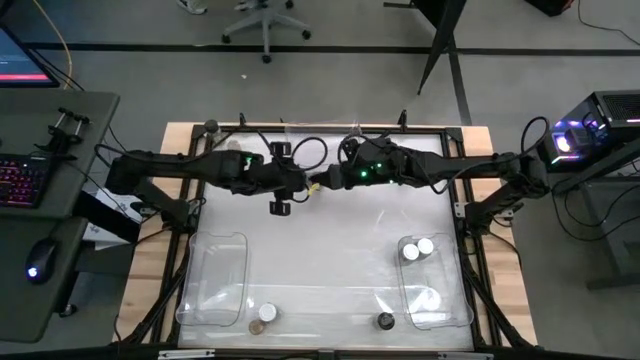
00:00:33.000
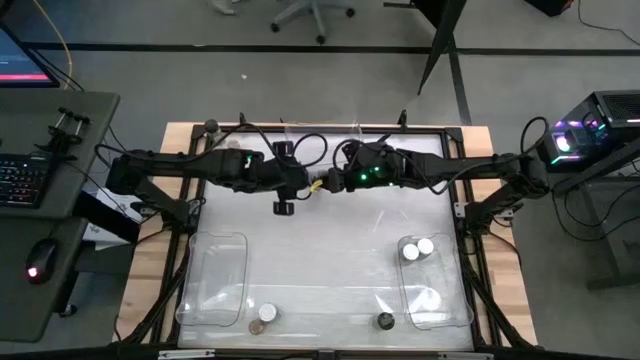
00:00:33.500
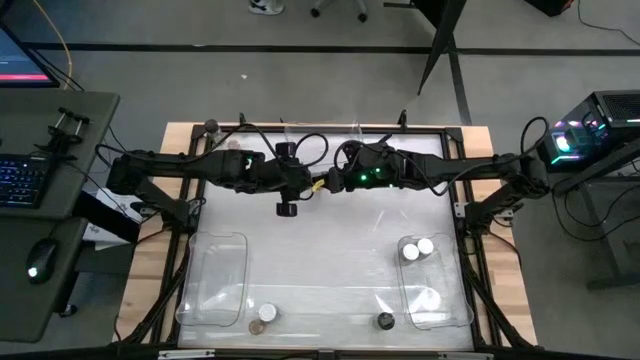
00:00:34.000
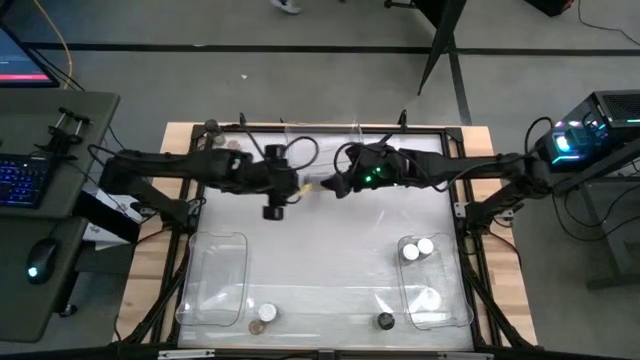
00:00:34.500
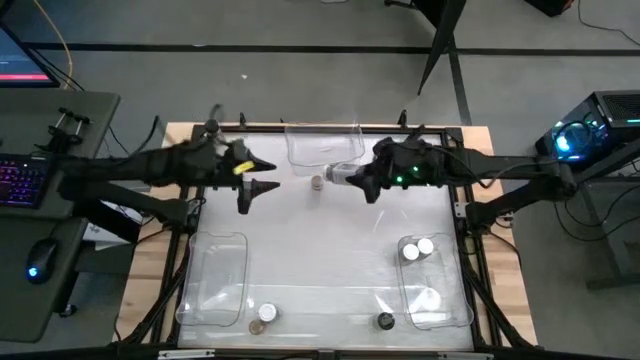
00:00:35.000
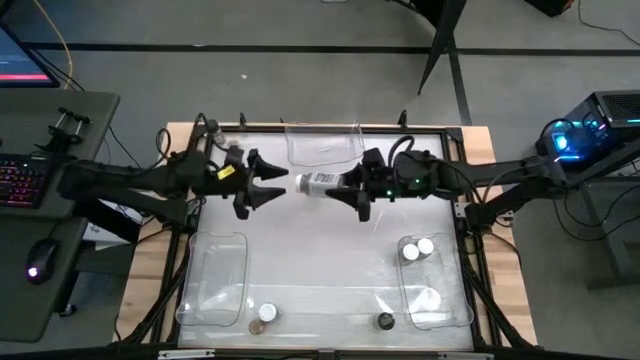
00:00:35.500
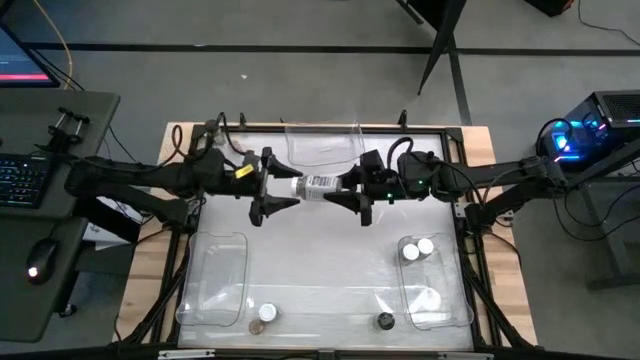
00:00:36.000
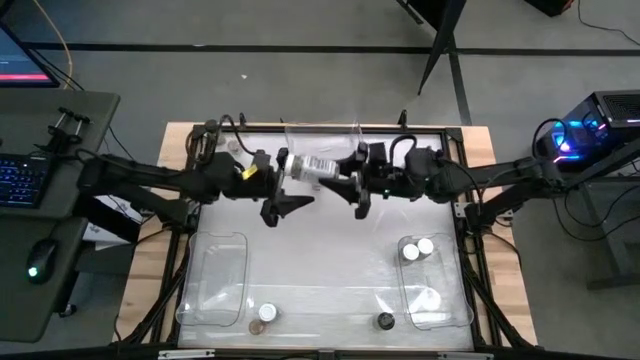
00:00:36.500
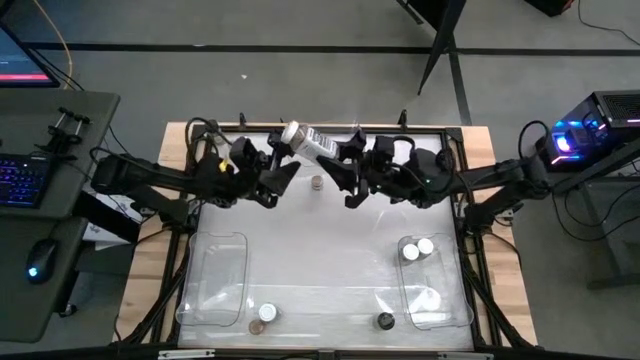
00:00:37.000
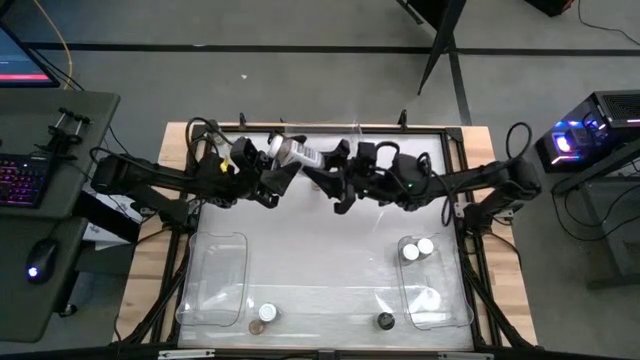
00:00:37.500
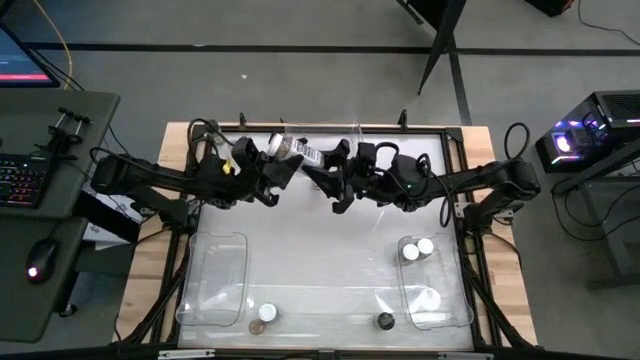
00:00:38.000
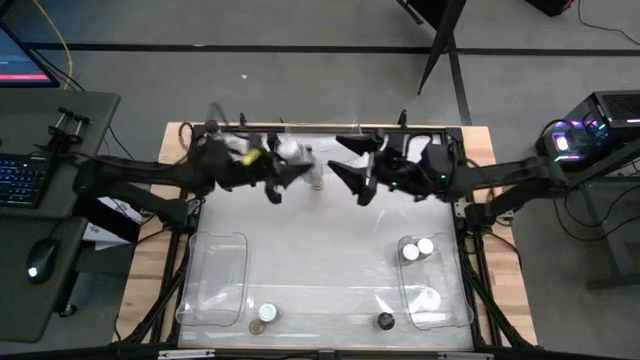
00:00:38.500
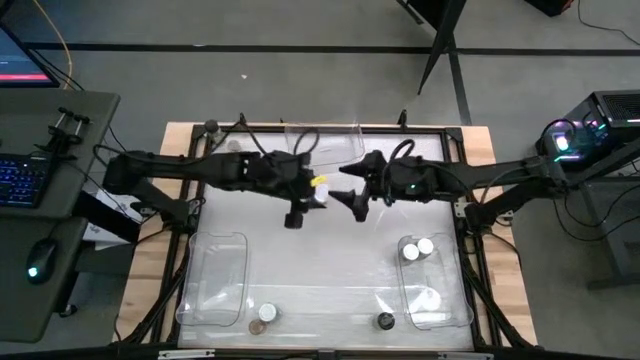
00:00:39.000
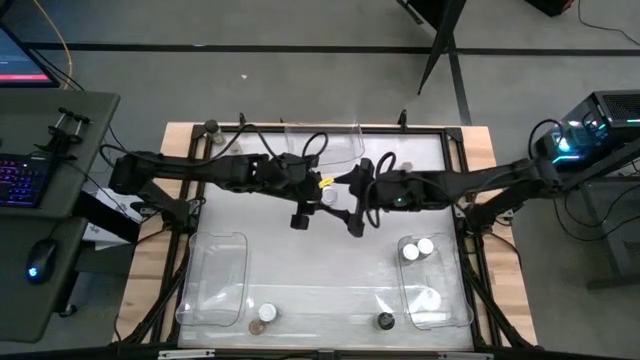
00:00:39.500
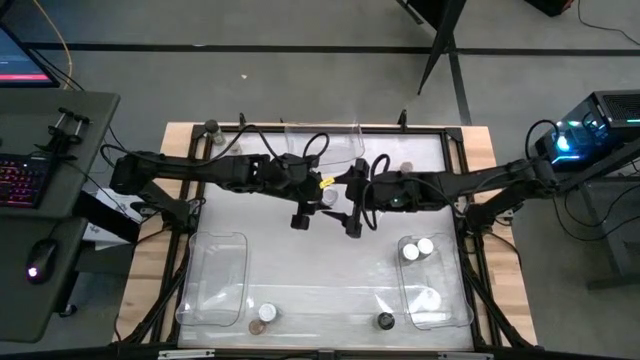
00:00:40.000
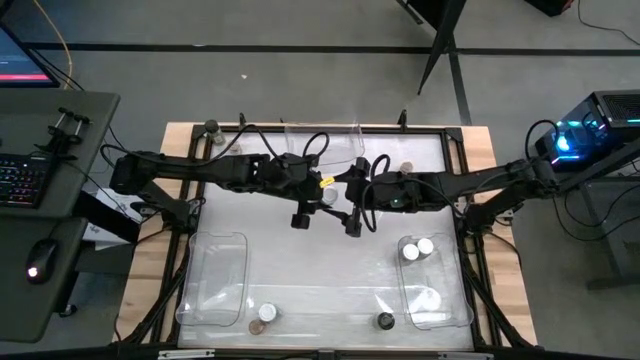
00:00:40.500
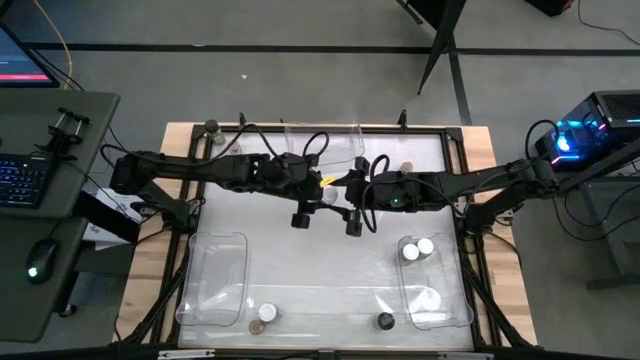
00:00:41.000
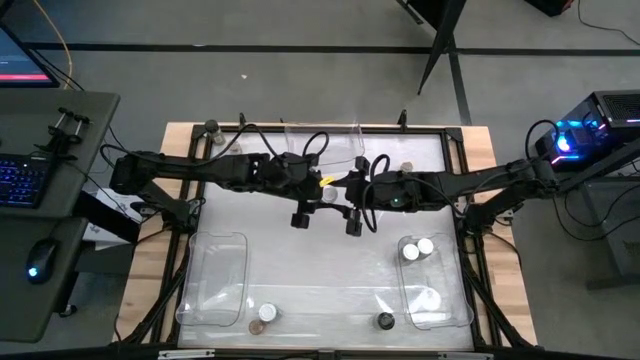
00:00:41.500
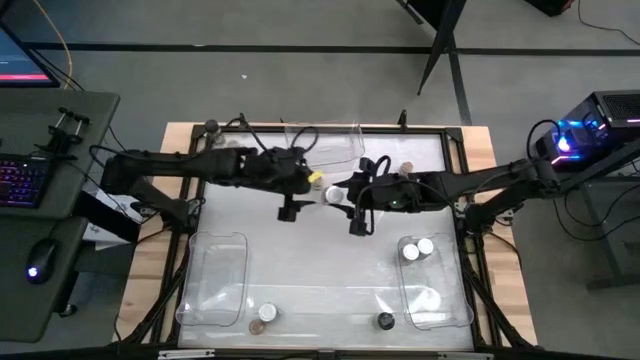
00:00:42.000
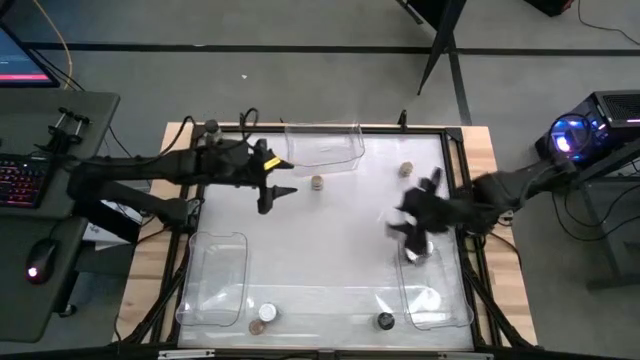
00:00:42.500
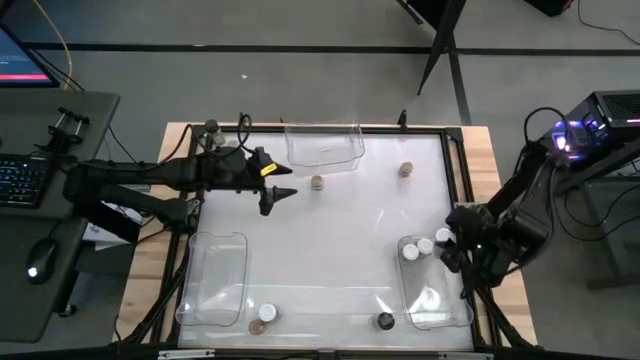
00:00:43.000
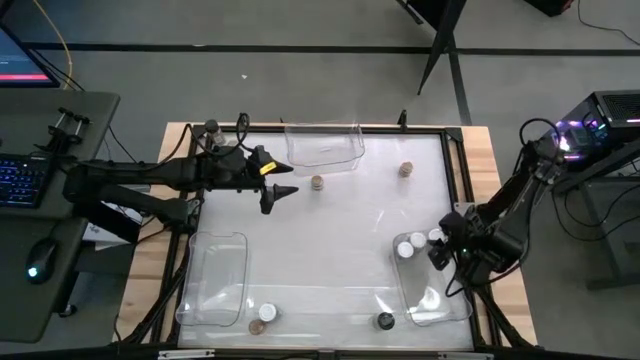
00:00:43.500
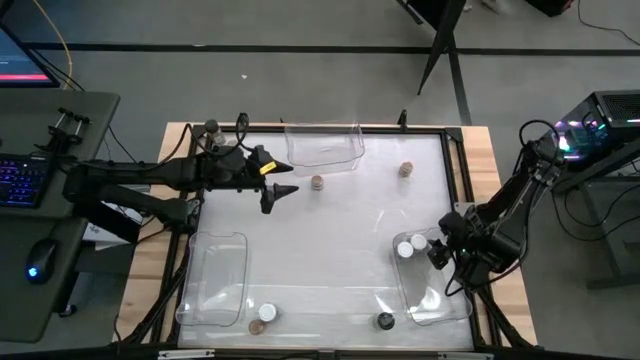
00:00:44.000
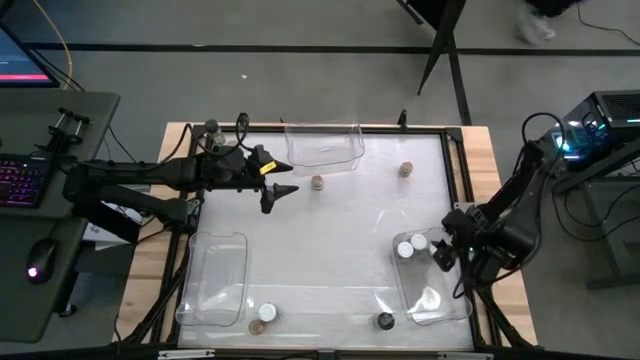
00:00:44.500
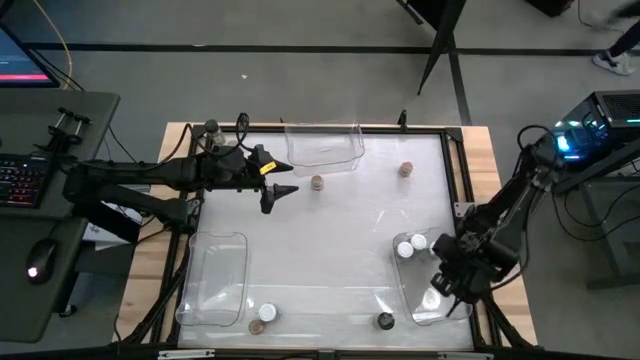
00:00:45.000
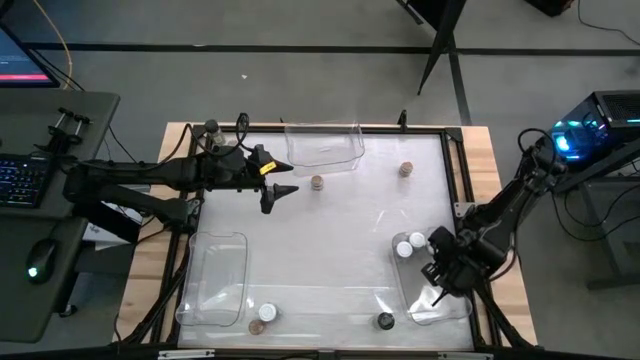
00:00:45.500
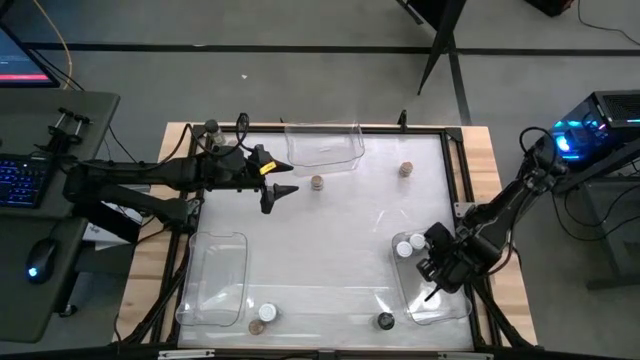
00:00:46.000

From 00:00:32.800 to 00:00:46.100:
Task: Sort spices by type
Put the white seasoning bottle into the bottom right transparent bin

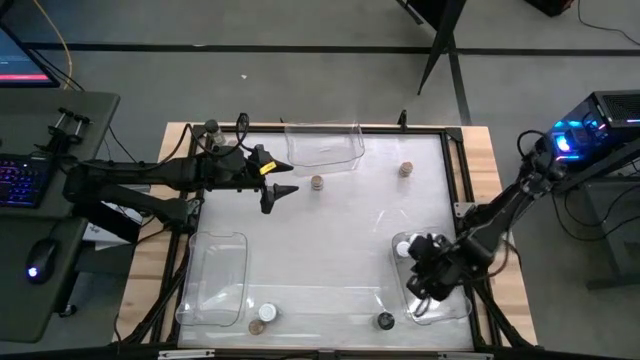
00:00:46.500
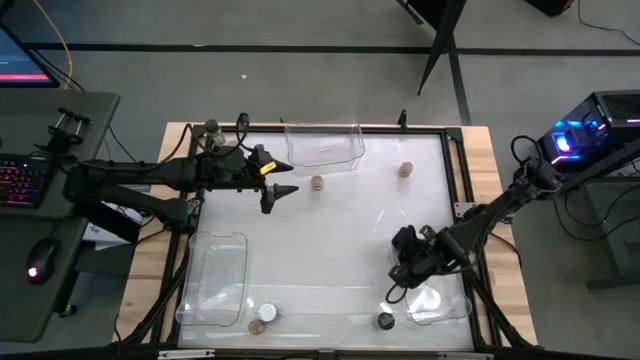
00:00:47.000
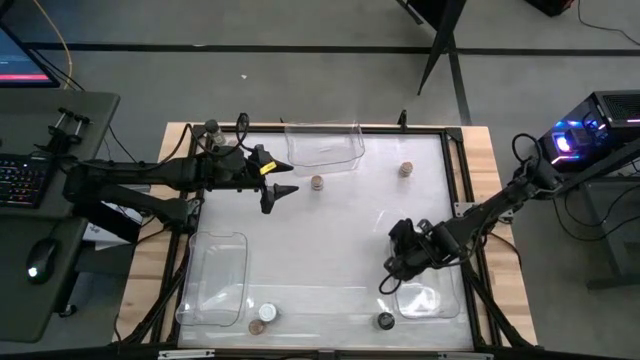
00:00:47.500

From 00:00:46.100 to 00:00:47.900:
Adjust the white seasoning bottle inside the bottom right transparent bin

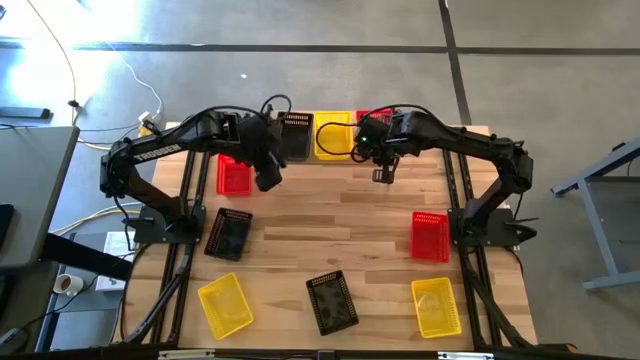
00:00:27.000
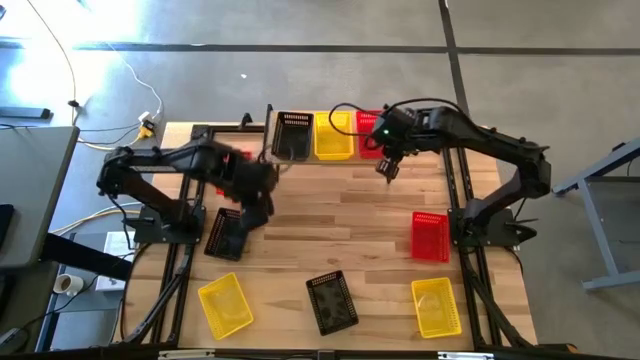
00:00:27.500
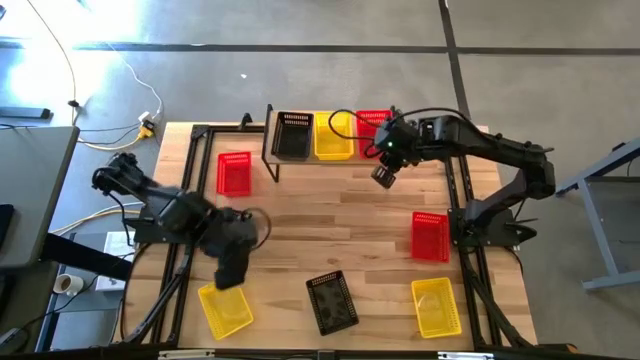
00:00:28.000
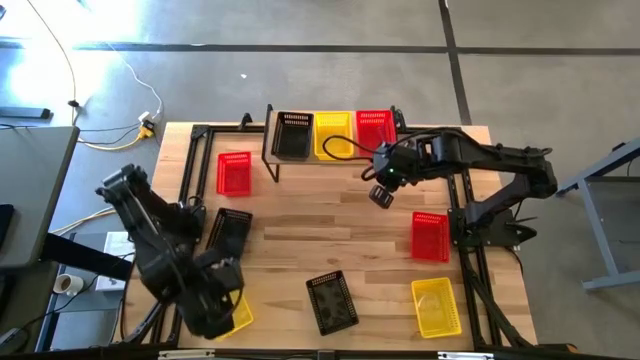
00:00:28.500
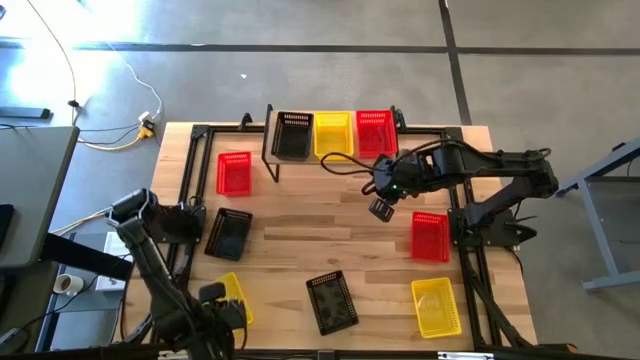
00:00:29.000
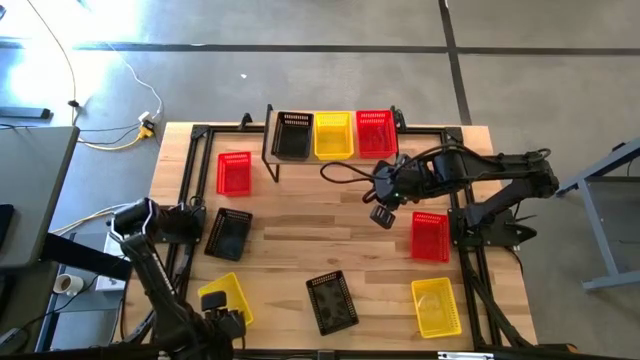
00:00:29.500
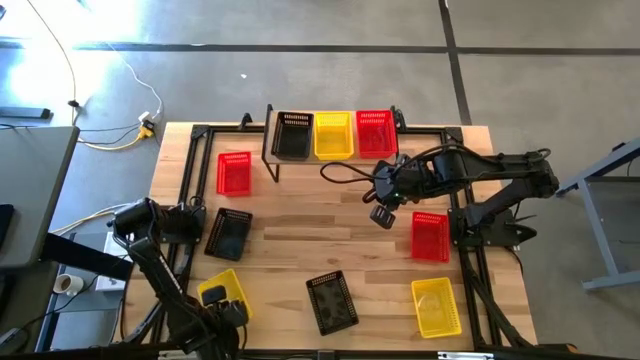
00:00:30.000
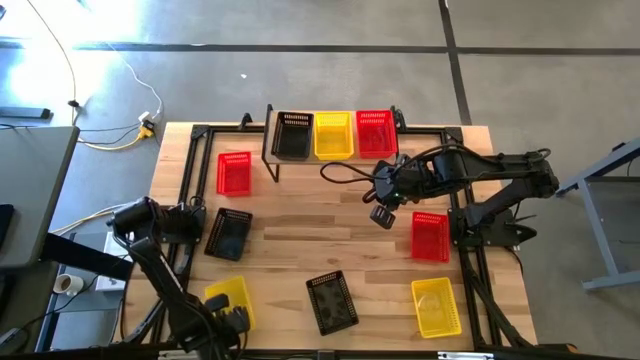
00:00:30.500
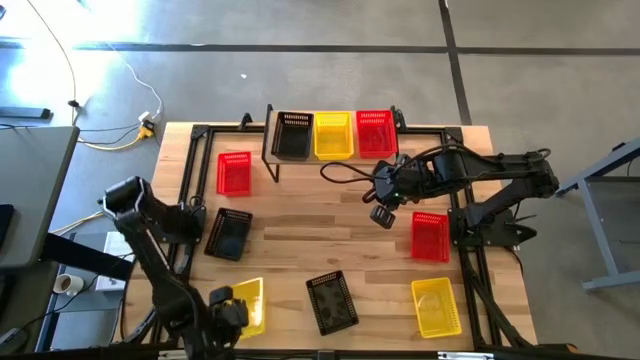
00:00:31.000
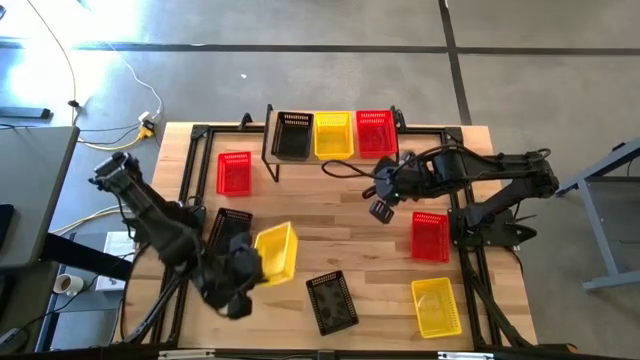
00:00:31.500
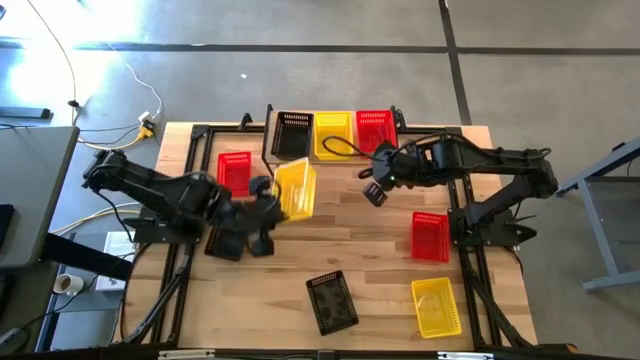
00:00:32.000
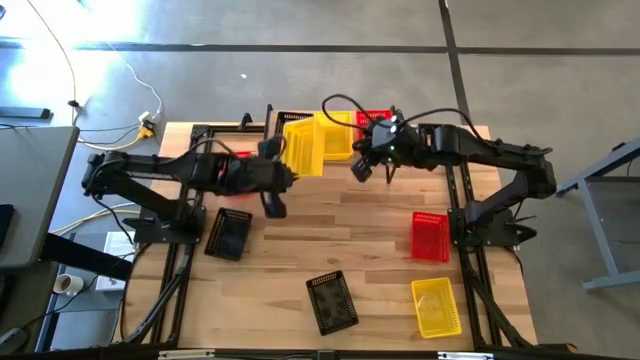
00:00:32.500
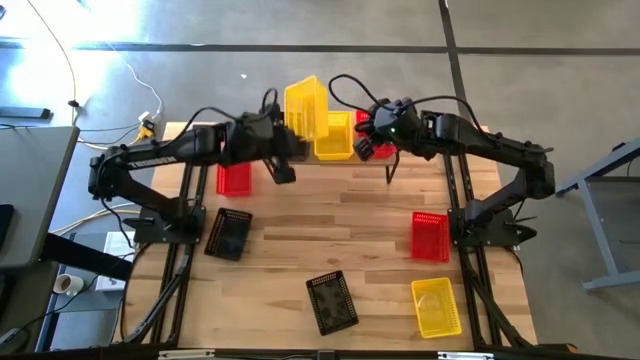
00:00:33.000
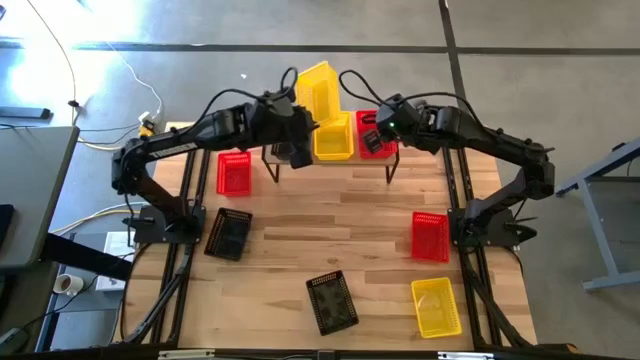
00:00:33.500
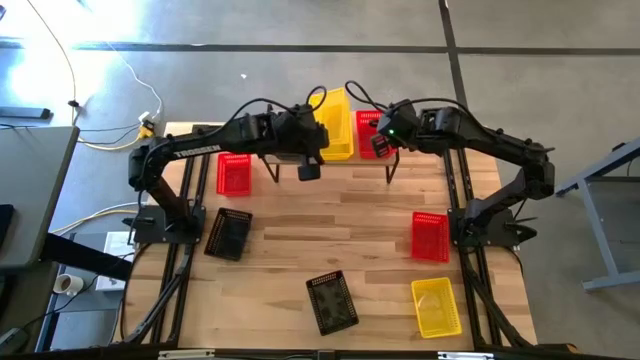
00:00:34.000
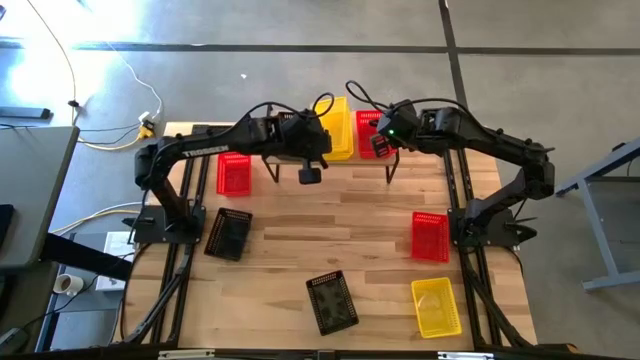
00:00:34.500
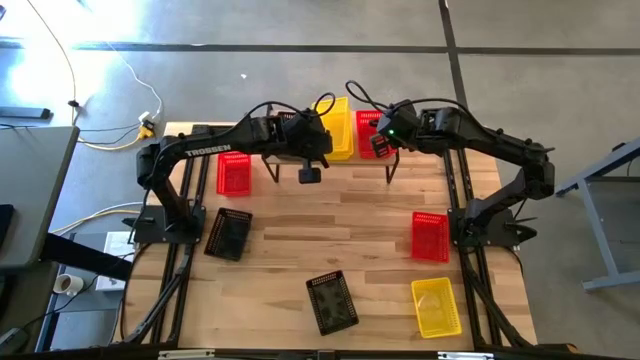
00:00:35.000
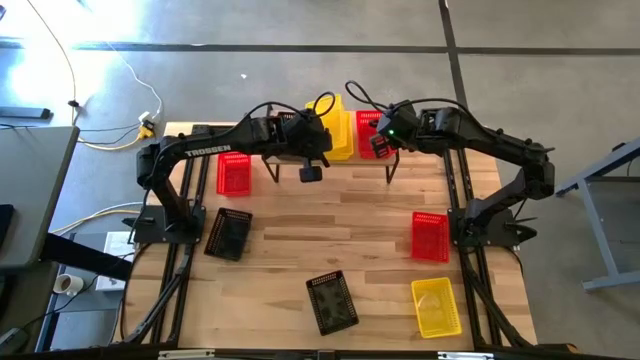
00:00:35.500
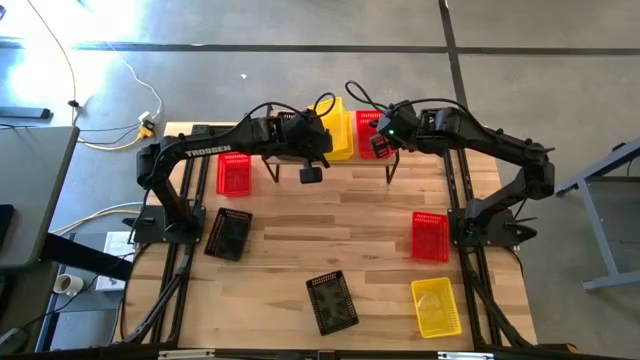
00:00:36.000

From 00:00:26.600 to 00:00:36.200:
Task: Stack baskets on shelf by color
Stack the left yellow bin on top of the yellow bin on the shelf
